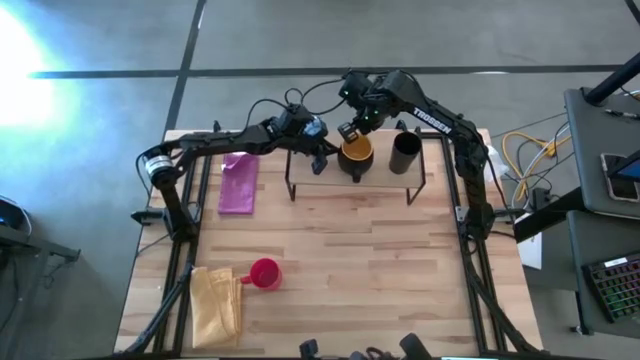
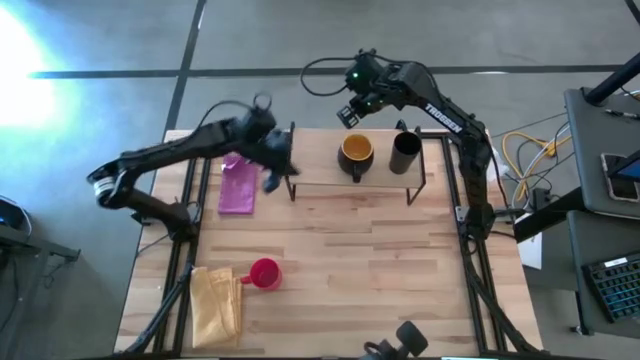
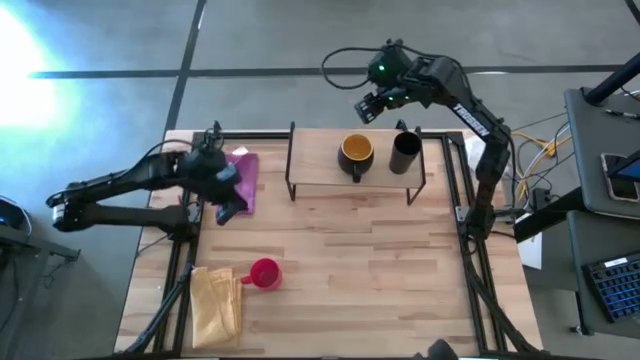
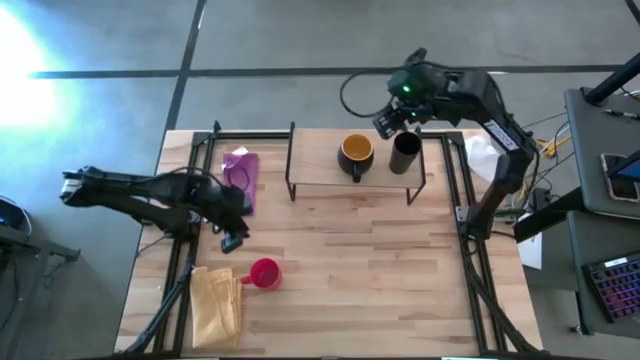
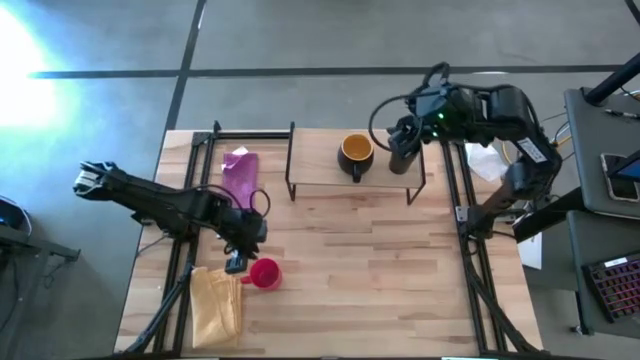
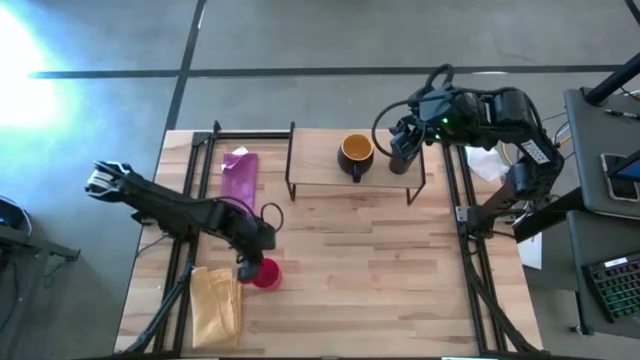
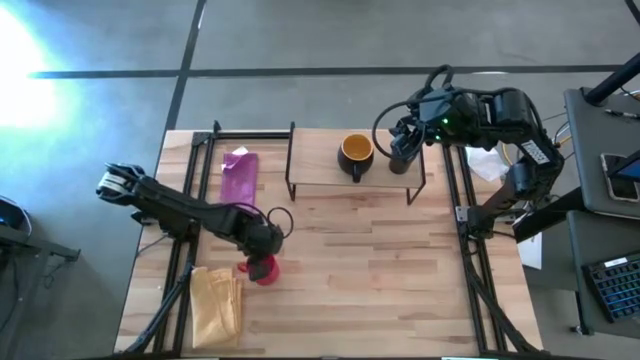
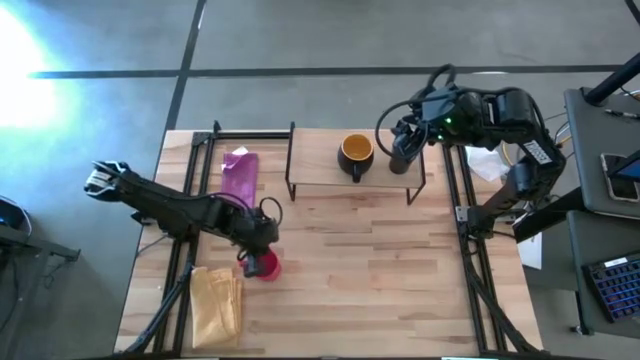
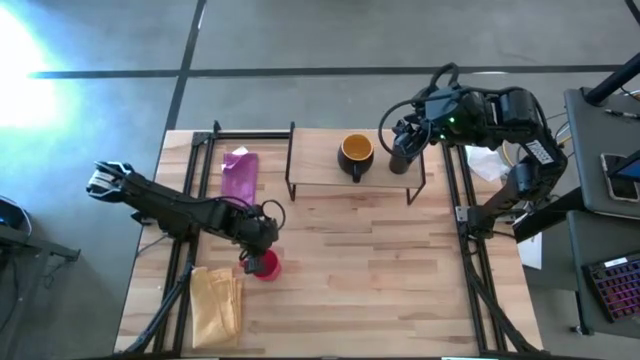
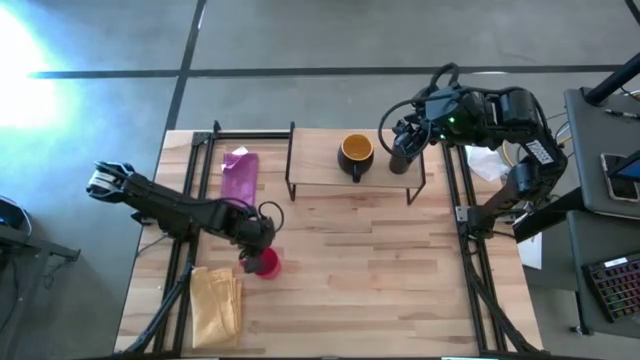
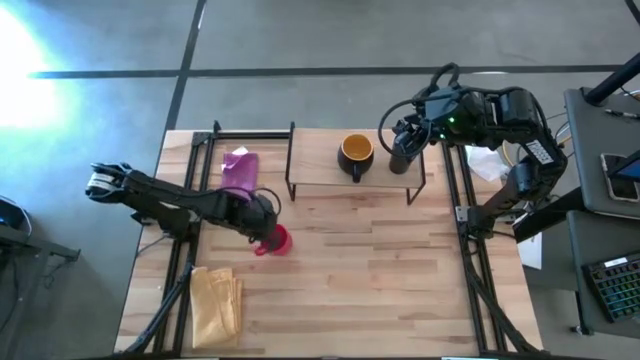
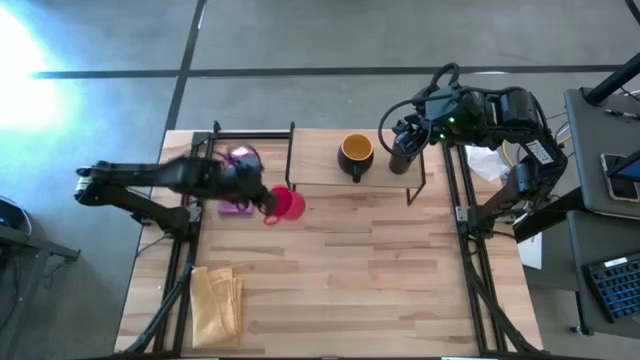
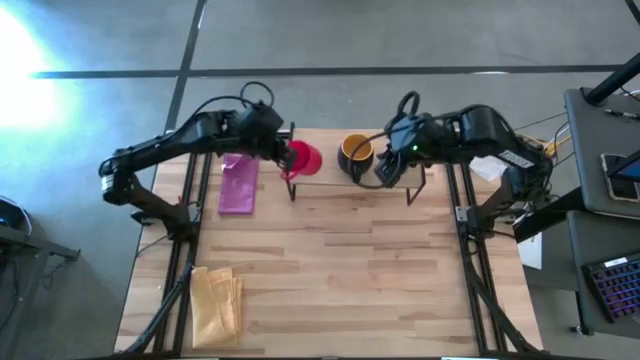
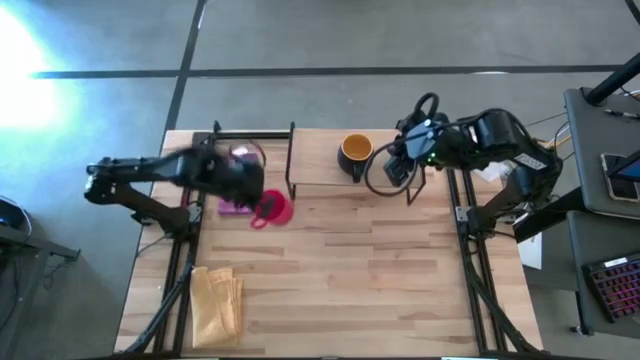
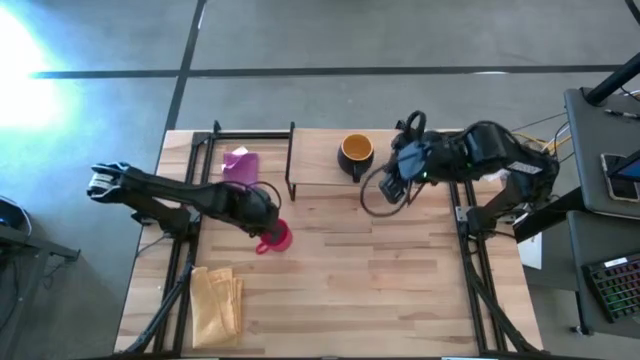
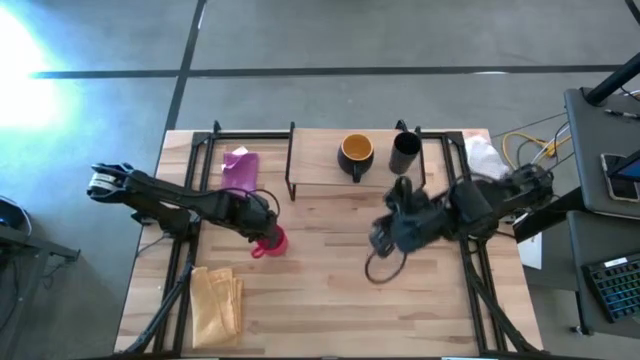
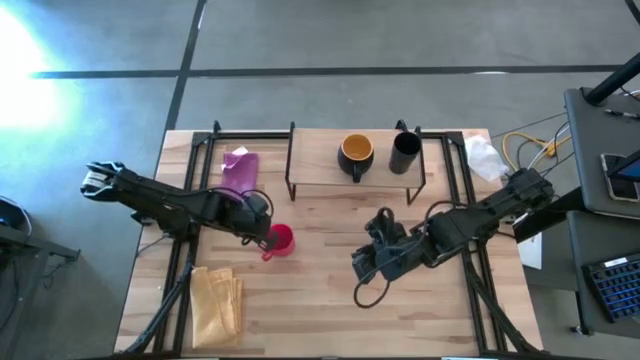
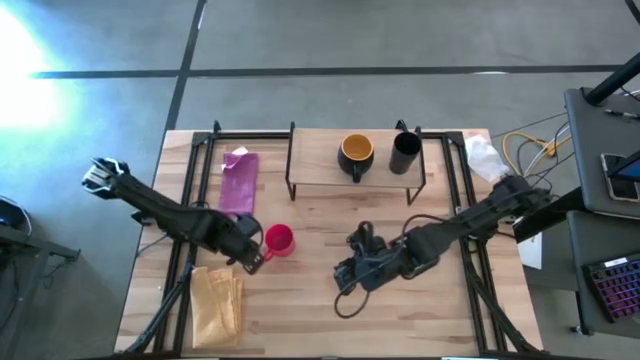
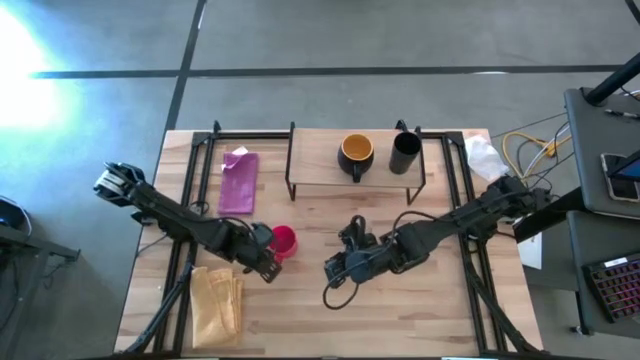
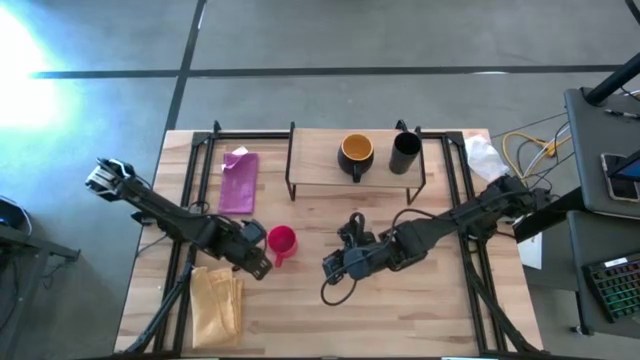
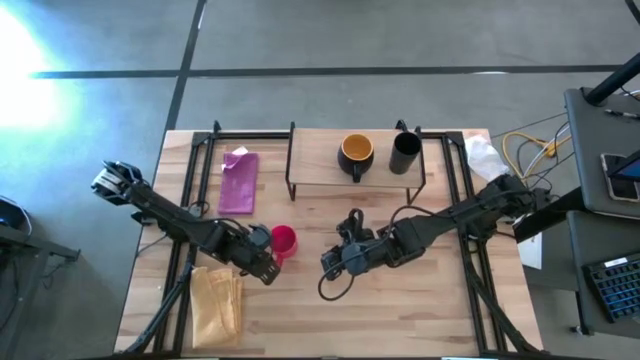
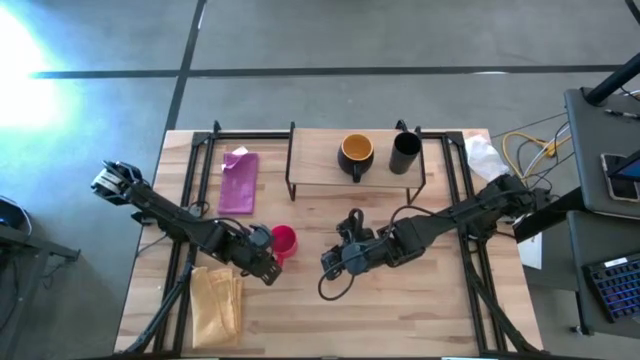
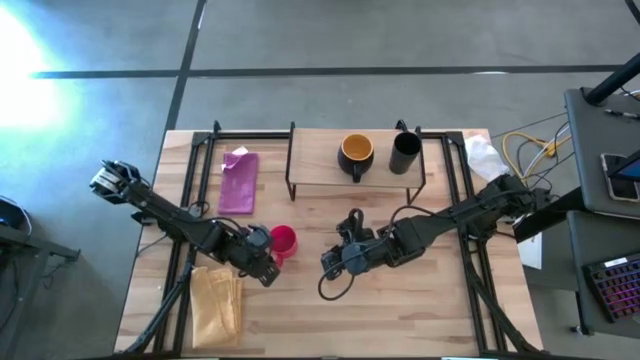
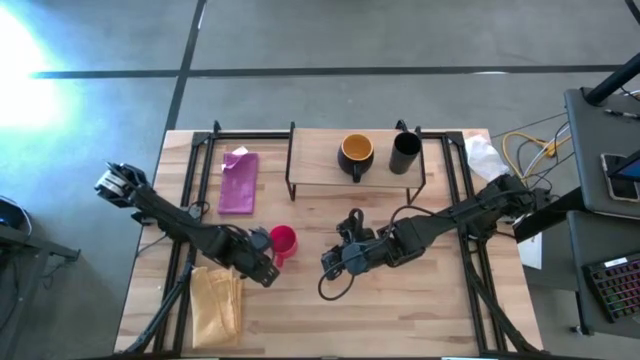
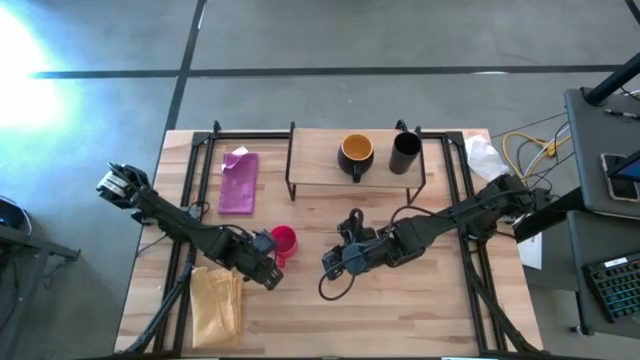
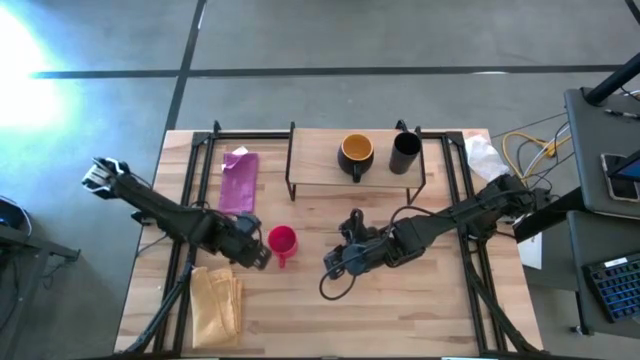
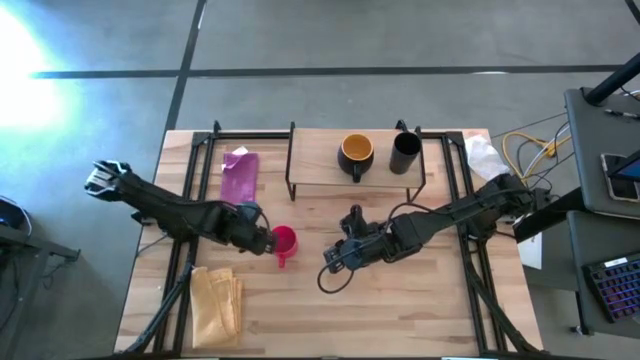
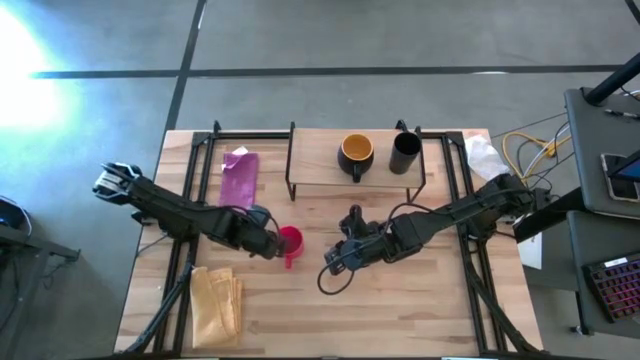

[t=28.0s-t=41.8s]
Task: Stack small to large cups/mugs on shelf
Put the red mug on the shelf

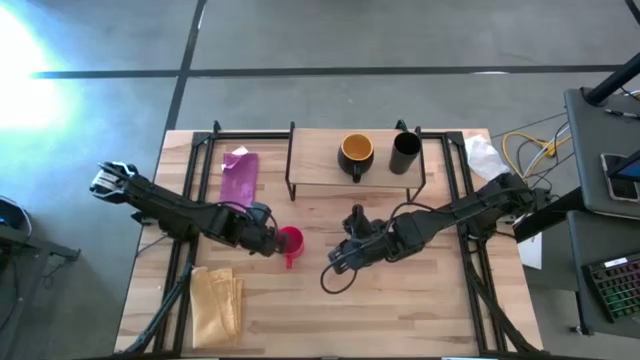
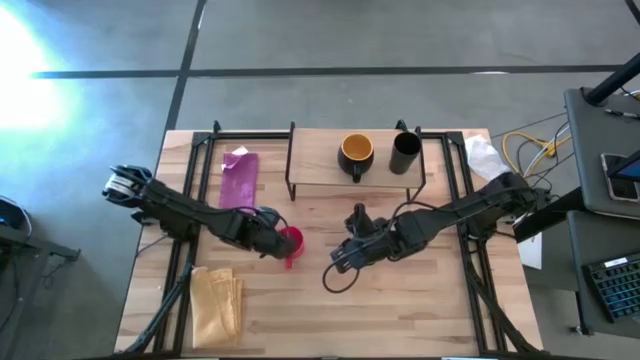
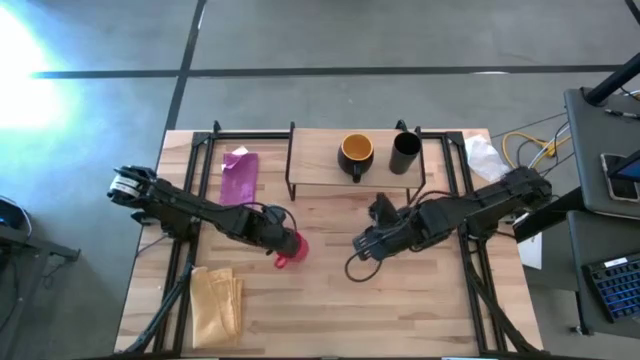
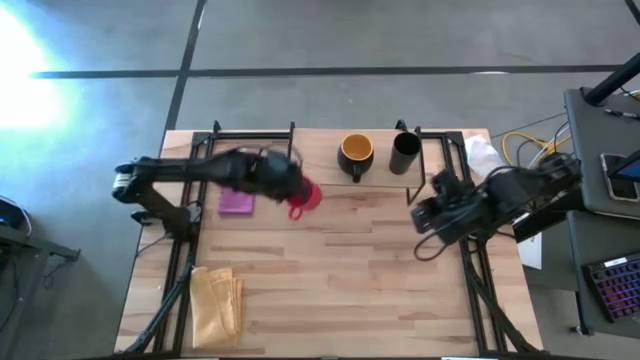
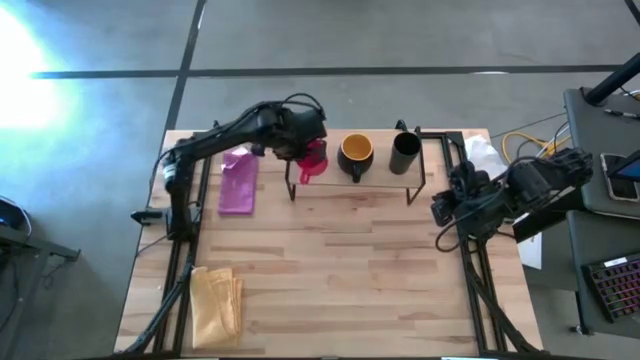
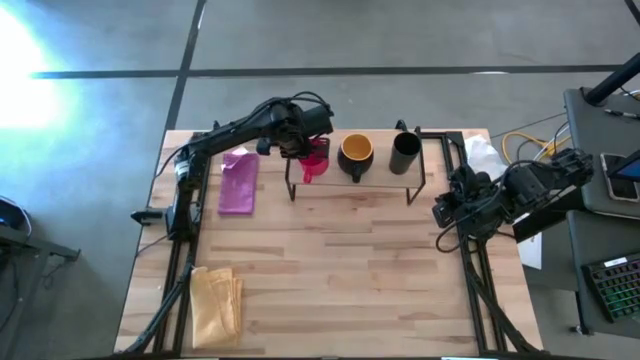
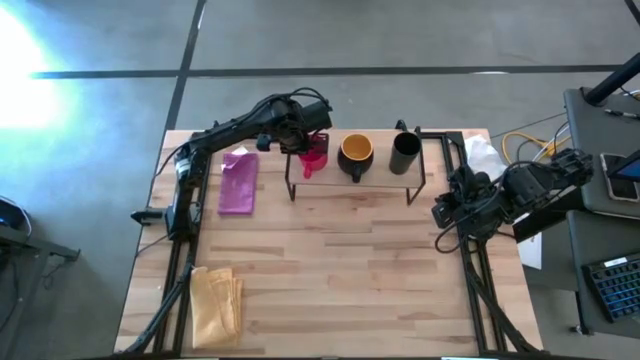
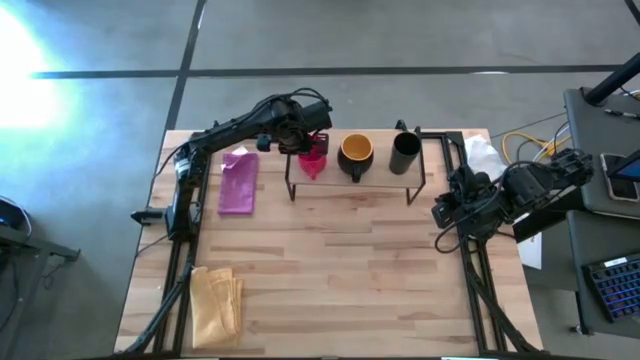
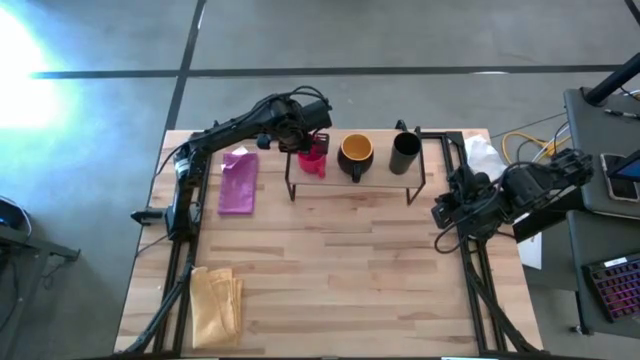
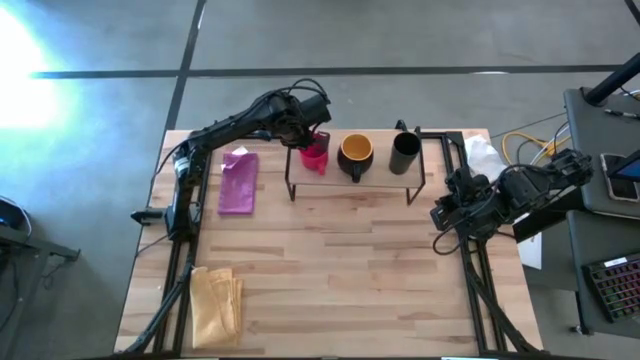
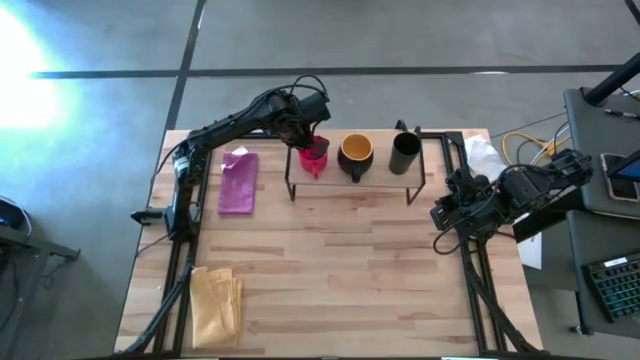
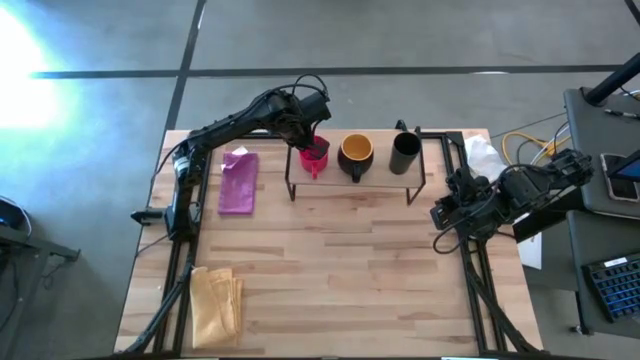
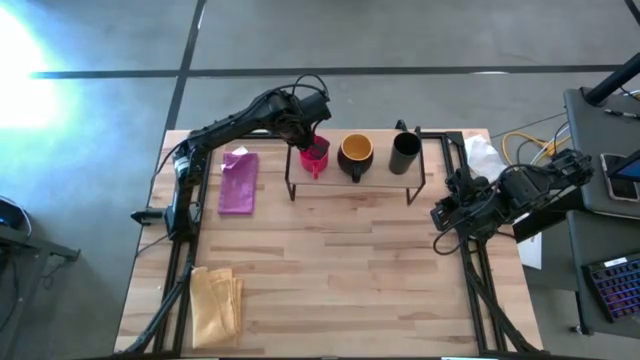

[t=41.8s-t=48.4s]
Put the red mug on the shelf

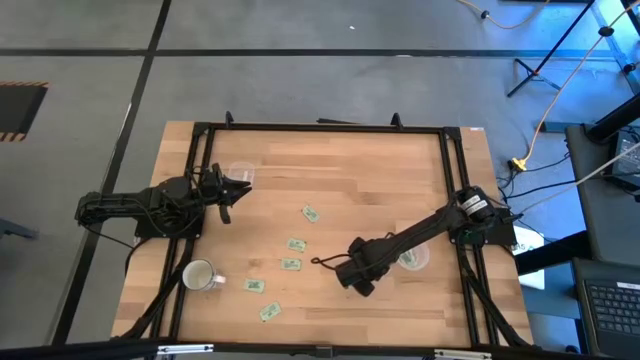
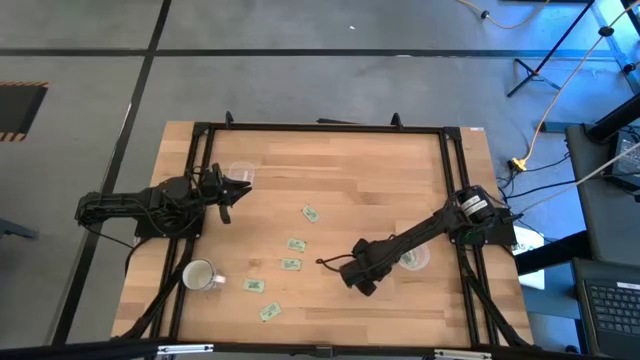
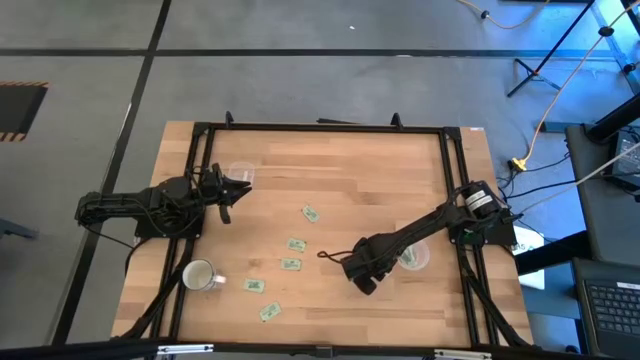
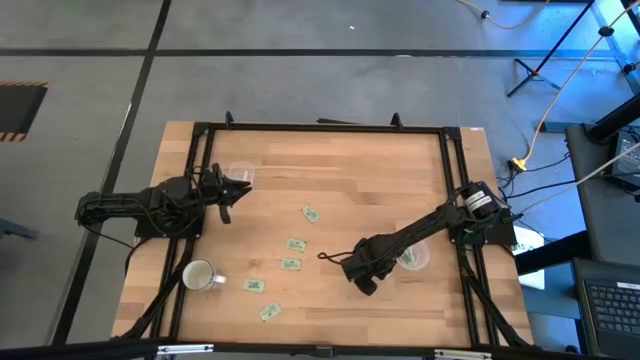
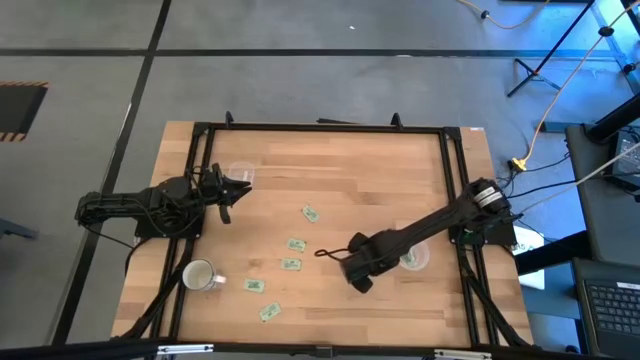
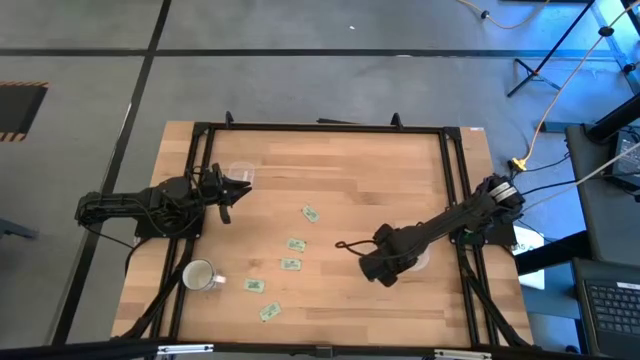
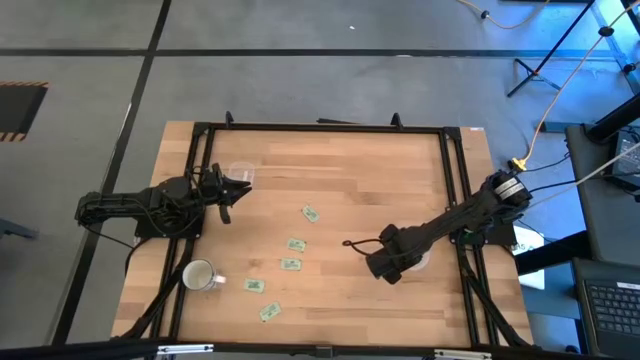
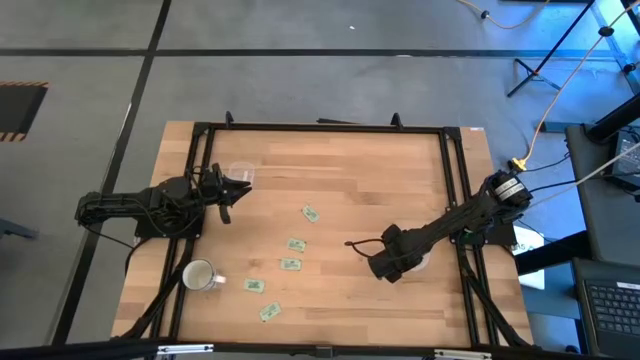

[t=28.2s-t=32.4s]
Task: Pick and place Stevia / Truvia into bins
Put the stevia packet into the round transparent container
